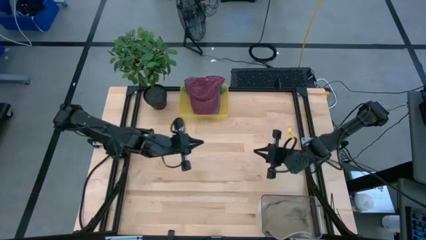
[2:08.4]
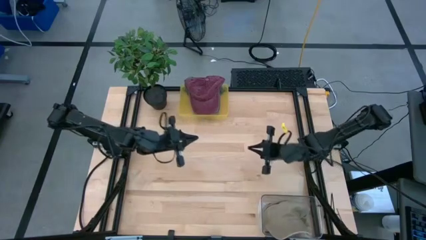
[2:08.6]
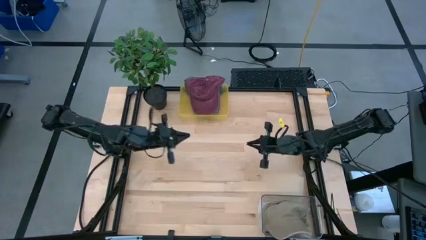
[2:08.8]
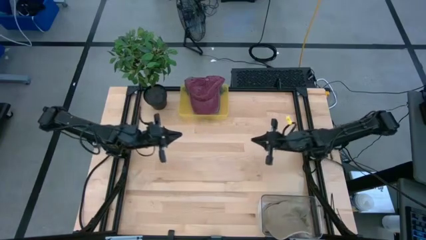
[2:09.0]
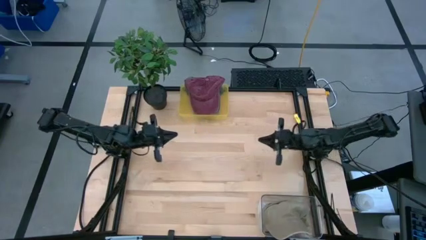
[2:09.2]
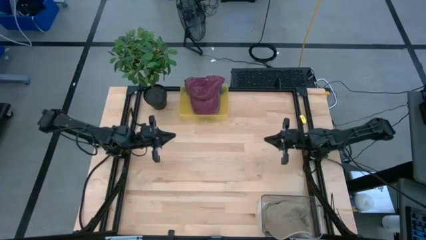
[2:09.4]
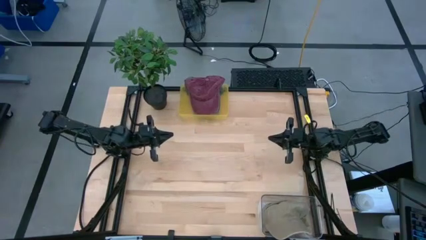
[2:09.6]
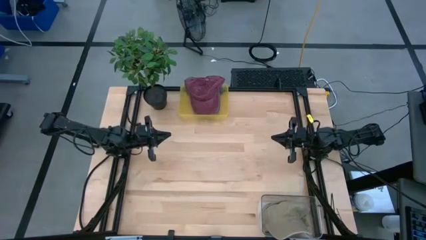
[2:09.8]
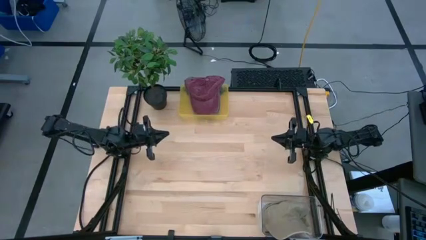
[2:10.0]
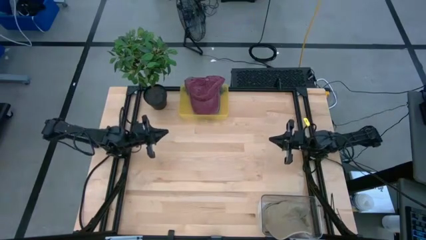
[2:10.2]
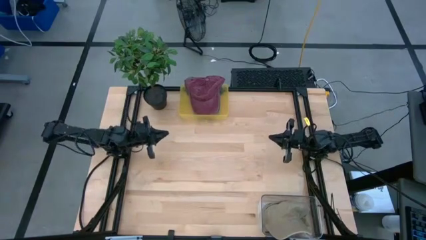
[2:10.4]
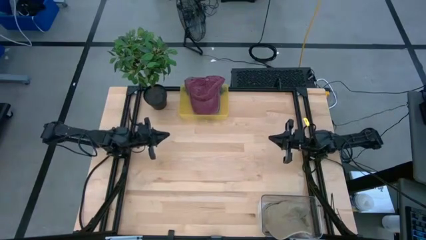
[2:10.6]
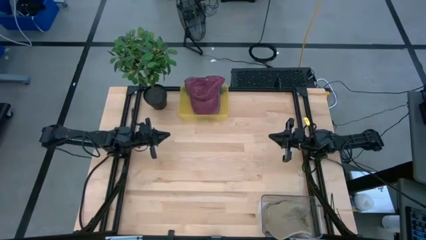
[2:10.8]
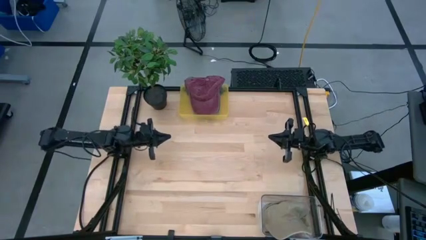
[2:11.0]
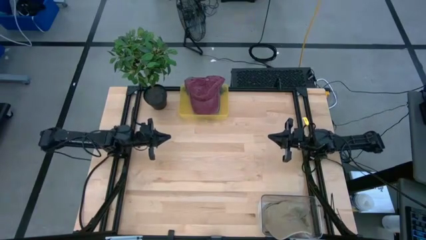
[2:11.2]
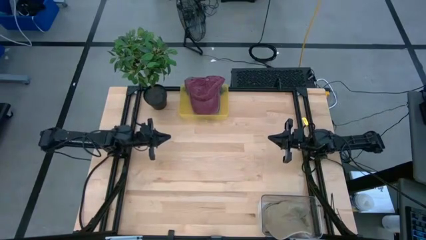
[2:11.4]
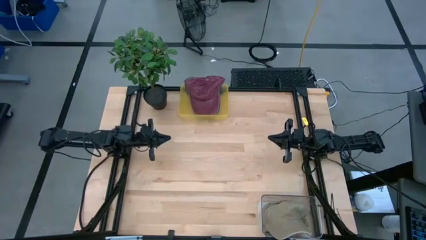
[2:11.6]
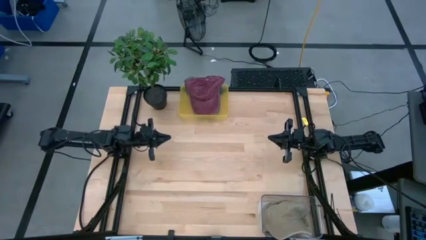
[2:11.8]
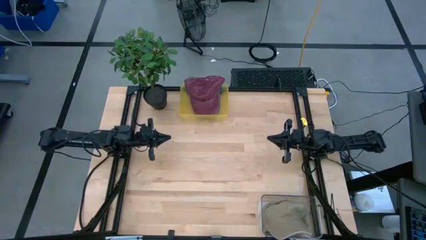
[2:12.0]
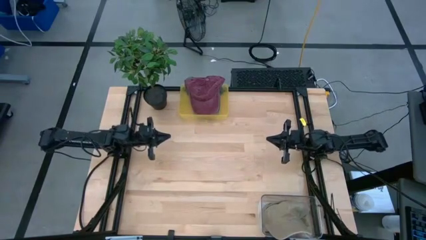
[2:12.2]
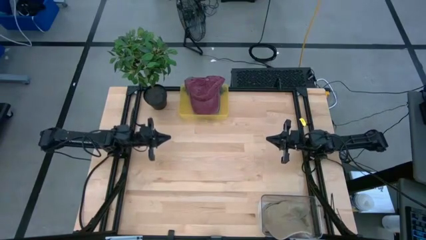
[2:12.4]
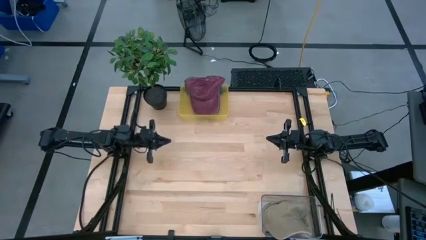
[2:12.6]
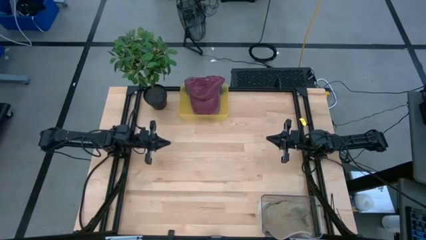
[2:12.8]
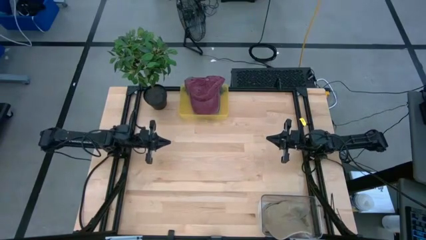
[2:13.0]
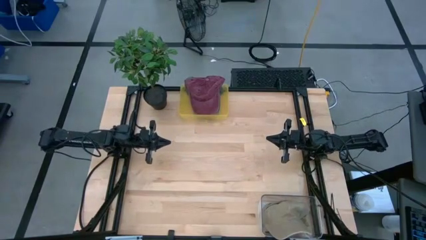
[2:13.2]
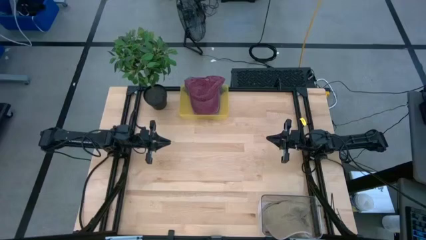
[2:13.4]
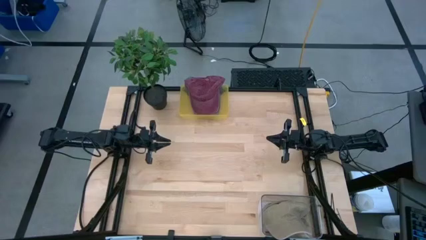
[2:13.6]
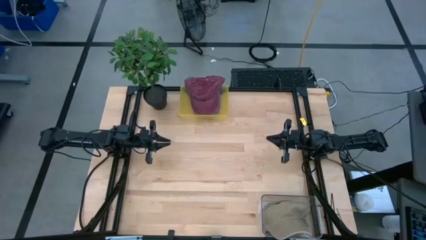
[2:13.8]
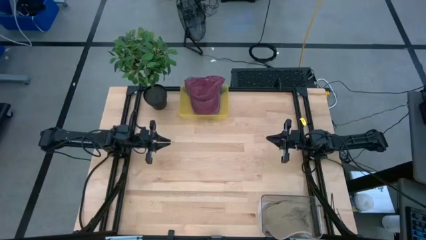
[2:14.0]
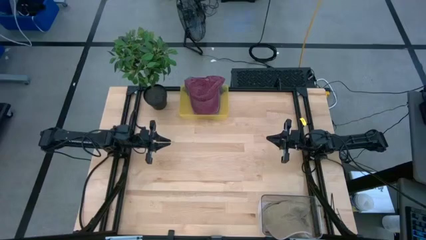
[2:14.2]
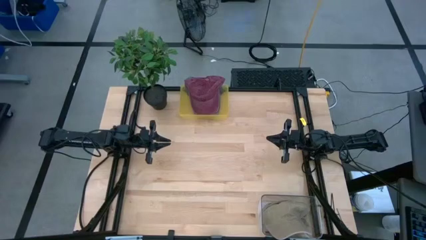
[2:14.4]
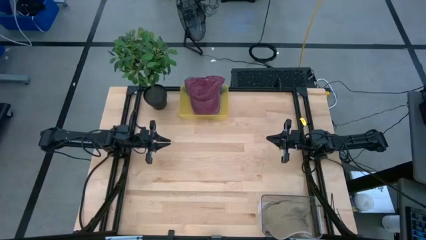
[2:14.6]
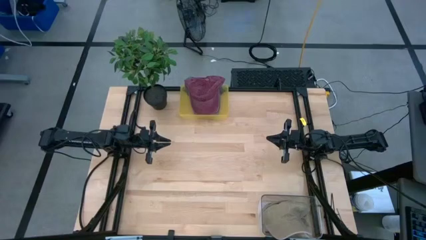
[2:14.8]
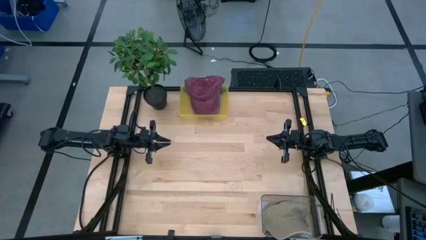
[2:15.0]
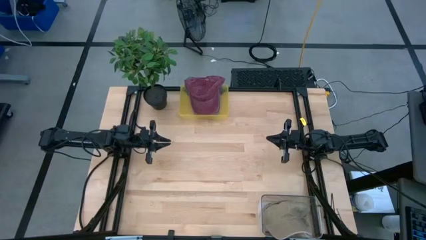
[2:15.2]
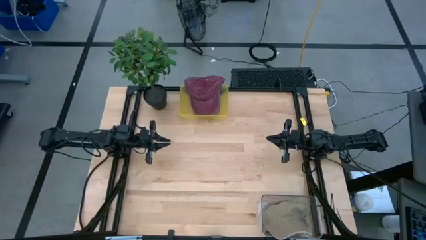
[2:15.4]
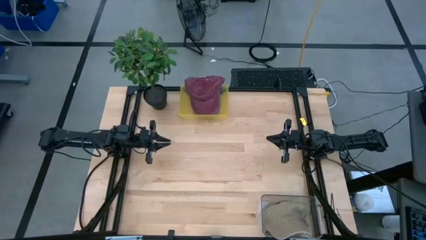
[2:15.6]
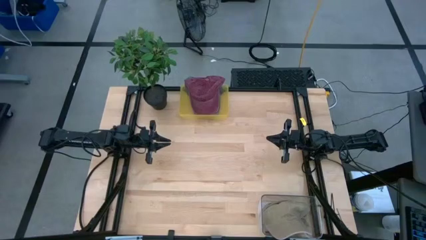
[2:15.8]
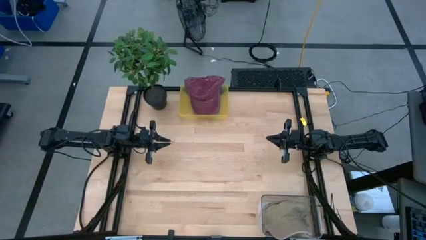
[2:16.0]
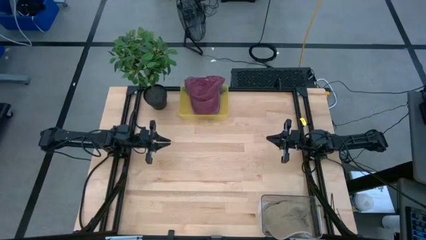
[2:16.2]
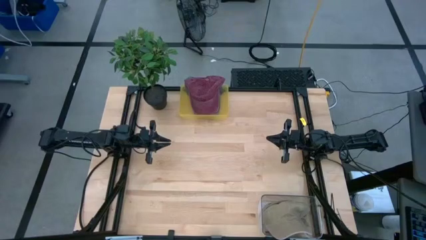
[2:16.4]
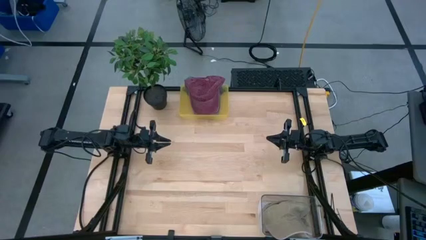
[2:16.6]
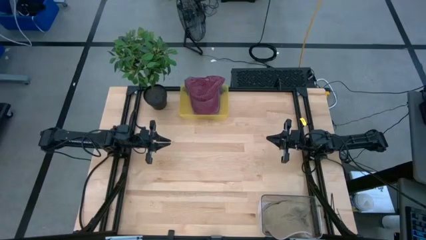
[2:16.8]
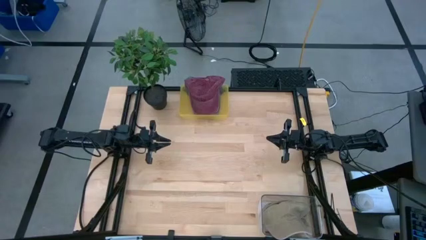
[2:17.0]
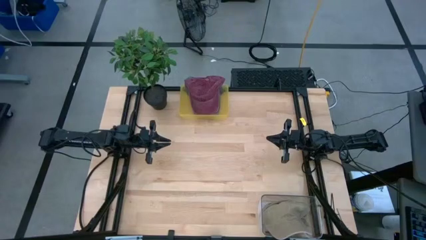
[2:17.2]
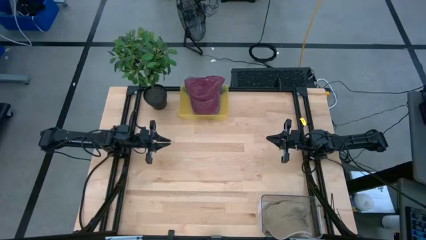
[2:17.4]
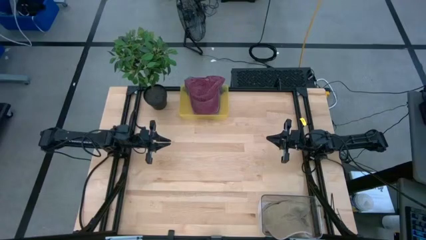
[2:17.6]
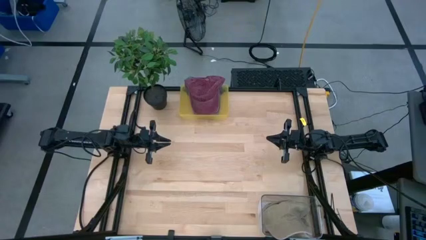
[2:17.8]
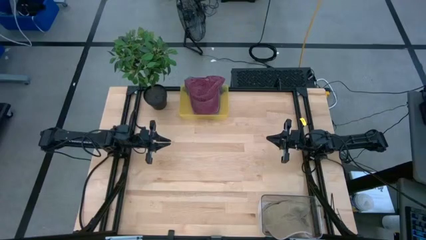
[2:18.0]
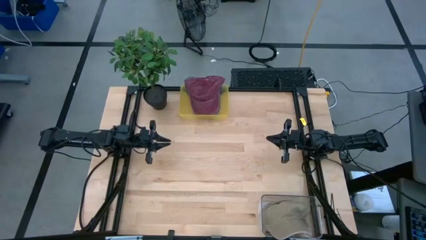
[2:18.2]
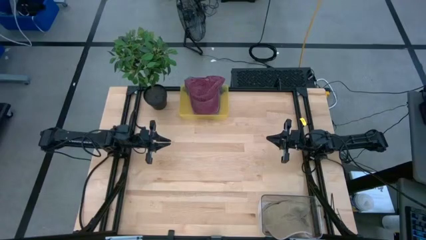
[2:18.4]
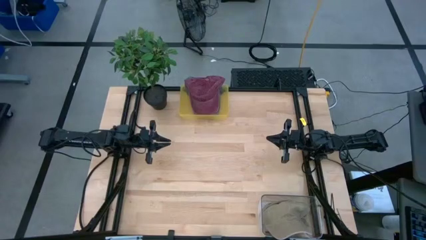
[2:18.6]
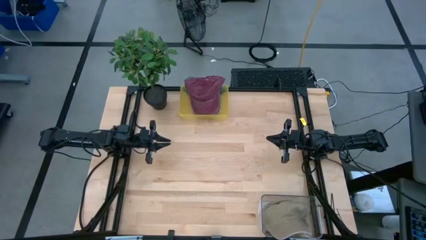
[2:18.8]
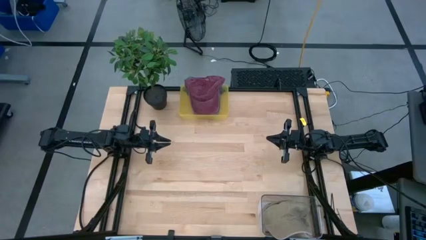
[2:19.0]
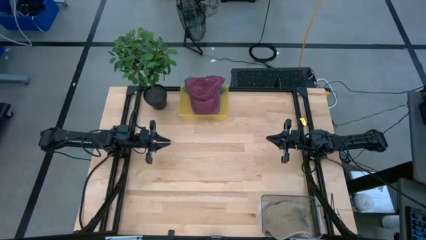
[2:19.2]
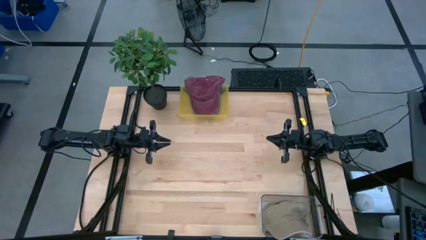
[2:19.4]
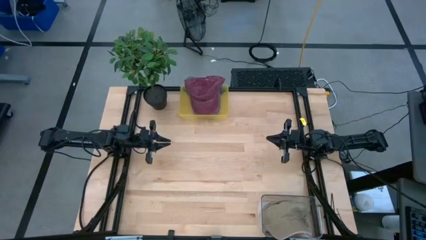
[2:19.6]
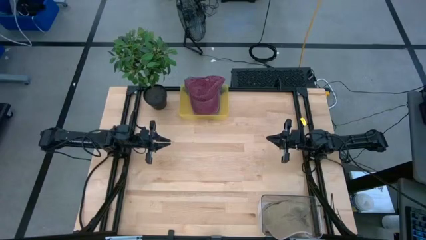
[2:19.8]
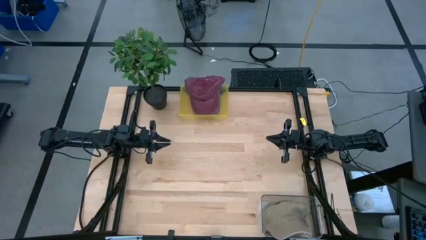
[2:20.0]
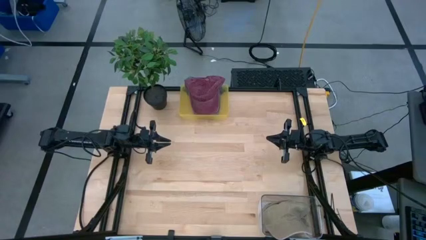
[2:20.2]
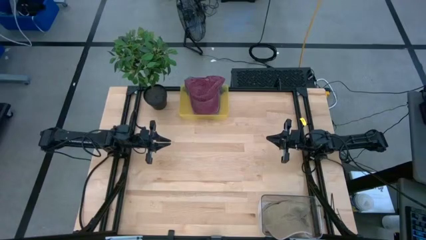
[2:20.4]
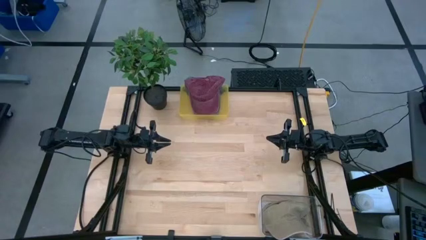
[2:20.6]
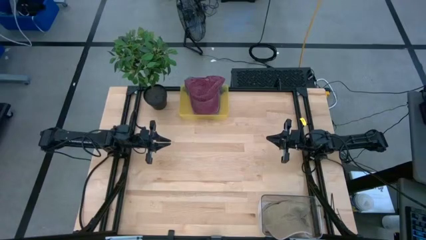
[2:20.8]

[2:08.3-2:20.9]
Task: Pick & Place hat
Return to Home Position
